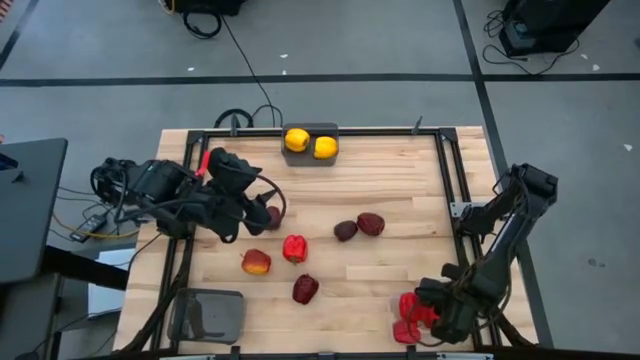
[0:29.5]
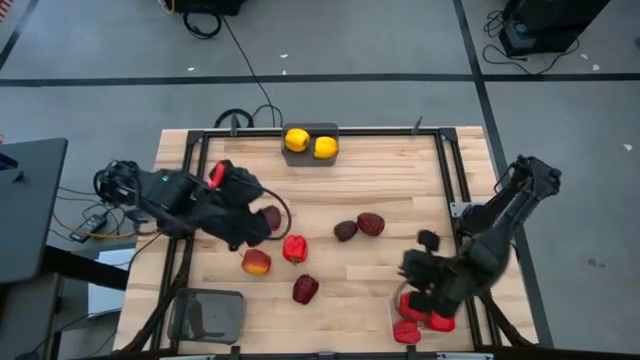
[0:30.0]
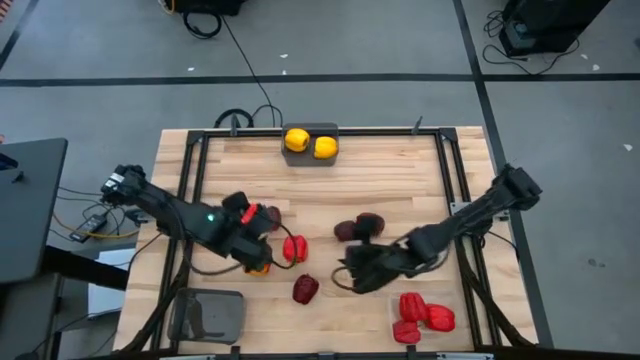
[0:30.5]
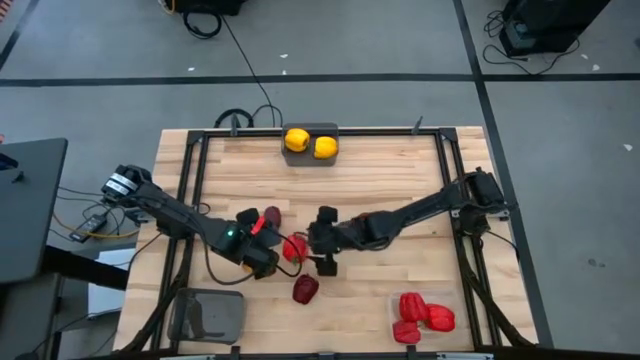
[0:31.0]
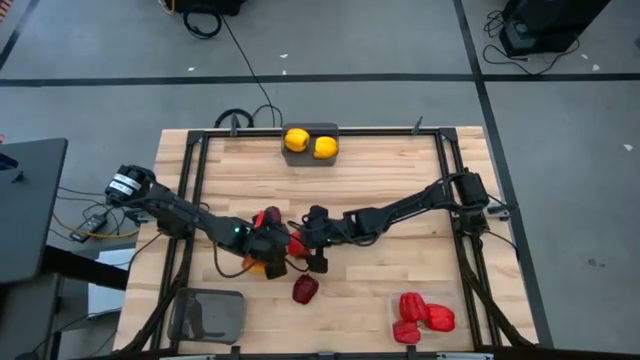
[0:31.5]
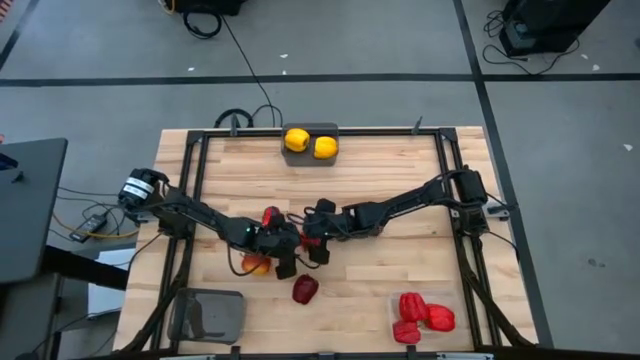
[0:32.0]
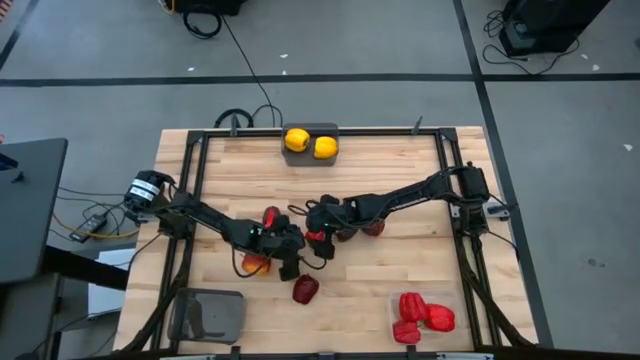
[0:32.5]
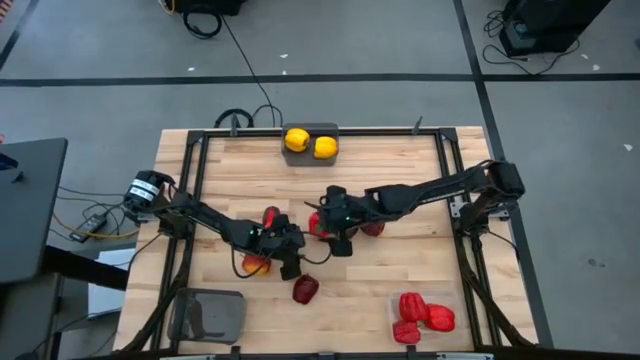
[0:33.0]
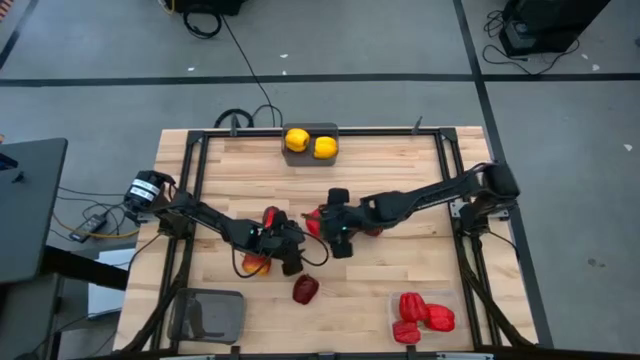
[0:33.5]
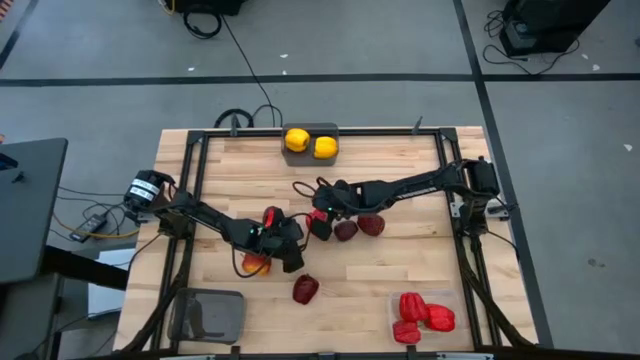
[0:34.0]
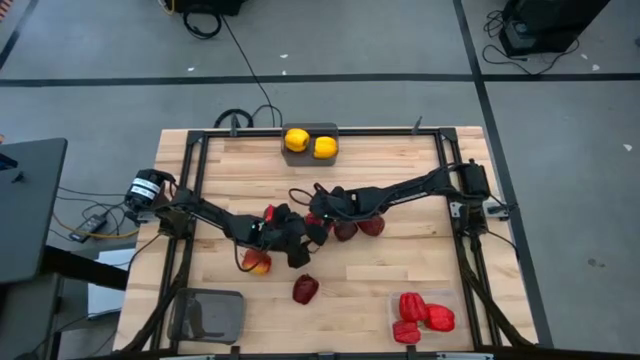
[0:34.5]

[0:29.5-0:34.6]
Task: Sort produce into baskets
Put the red bell pepper into the transparent bin

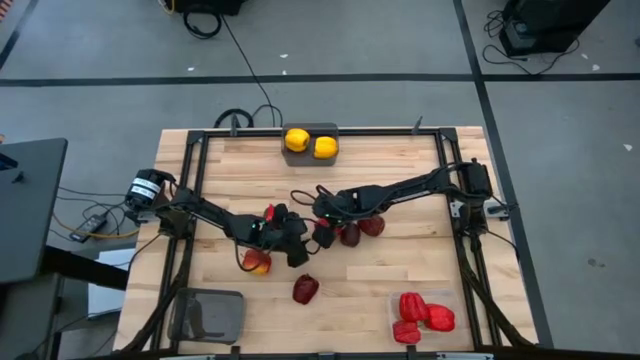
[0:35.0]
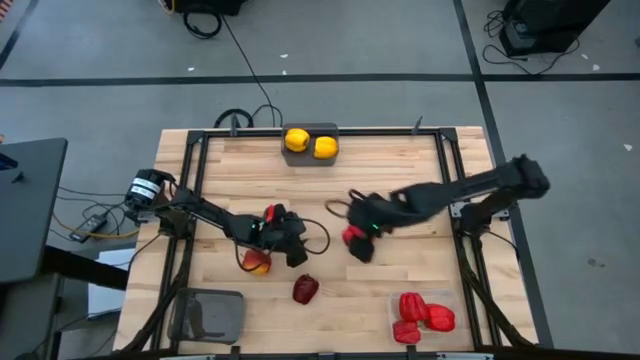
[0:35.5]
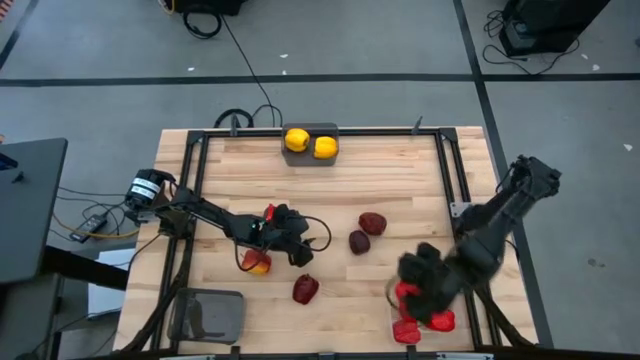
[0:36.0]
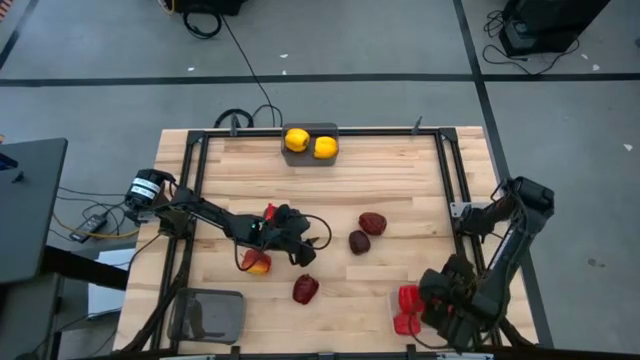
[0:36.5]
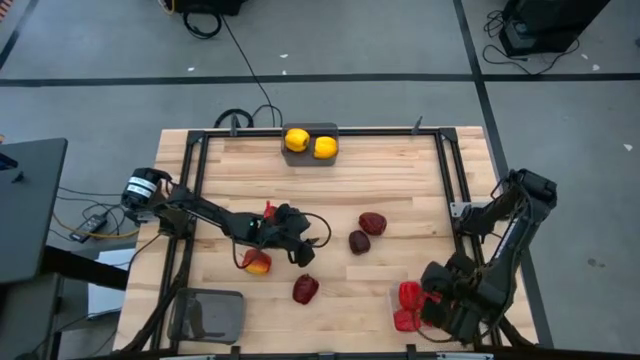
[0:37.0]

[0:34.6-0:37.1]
Put the red bell pepper into the transparent bin

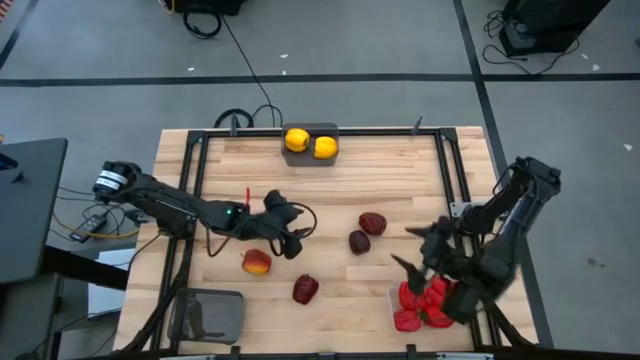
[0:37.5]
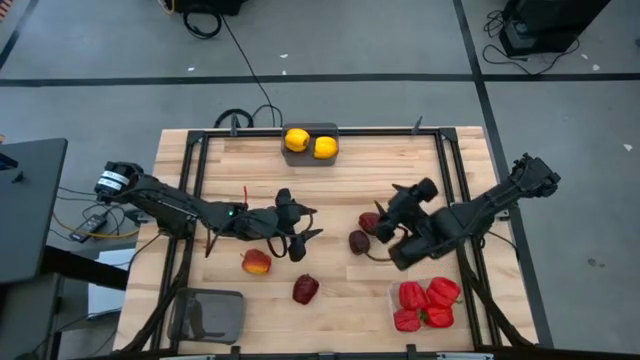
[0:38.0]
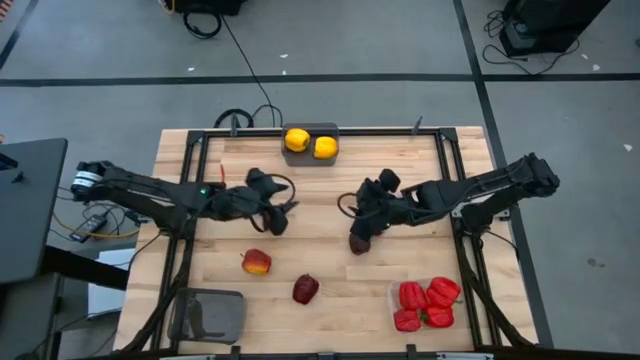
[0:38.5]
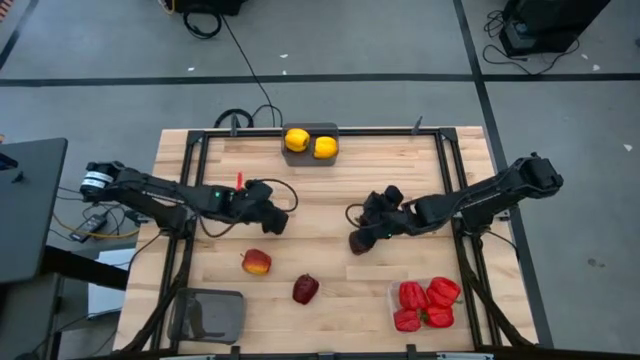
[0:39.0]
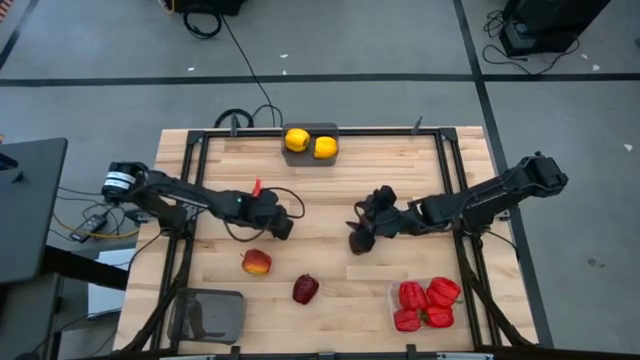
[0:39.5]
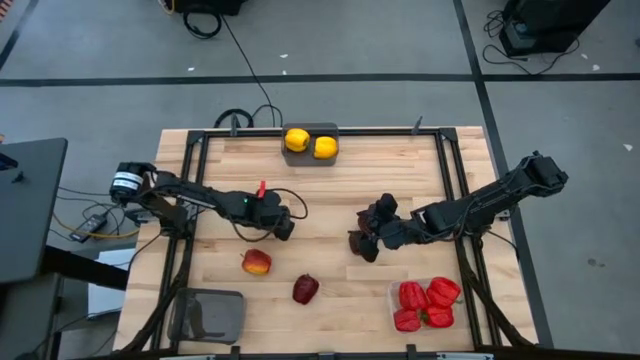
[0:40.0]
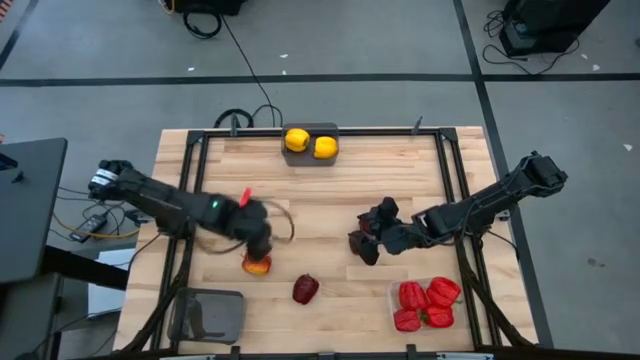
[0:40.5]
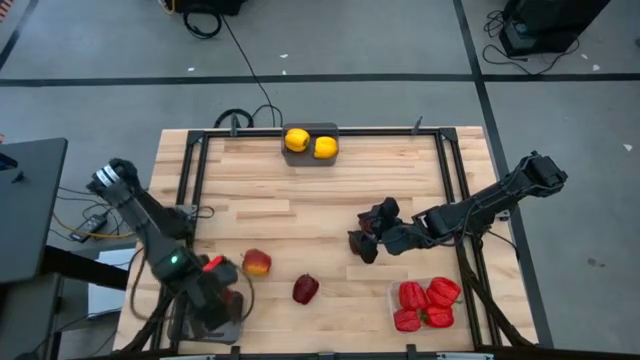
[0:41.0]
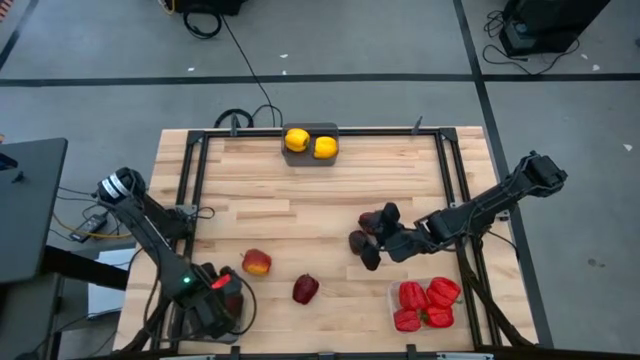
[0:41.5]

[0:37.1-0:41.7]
Put the red apple into the bottom black bin

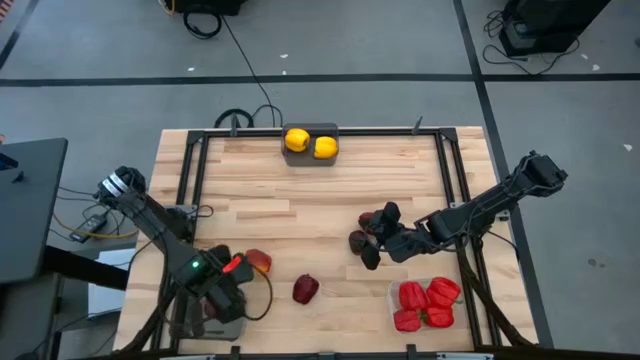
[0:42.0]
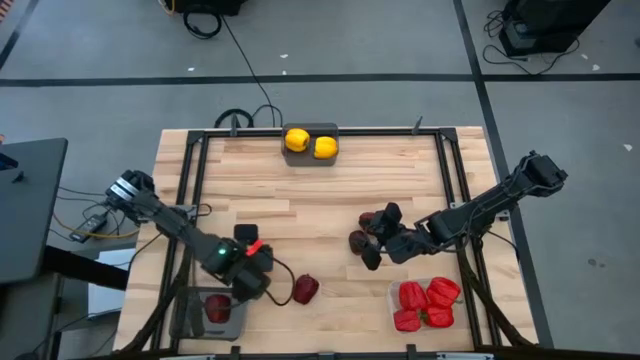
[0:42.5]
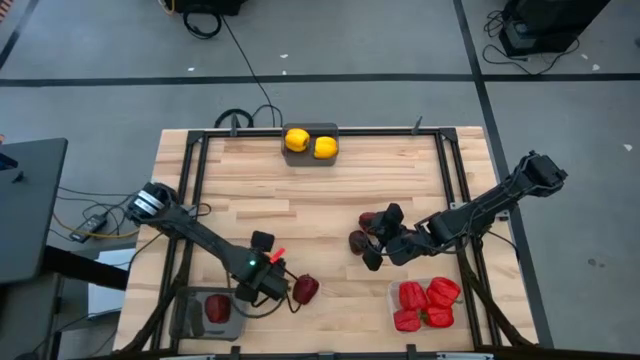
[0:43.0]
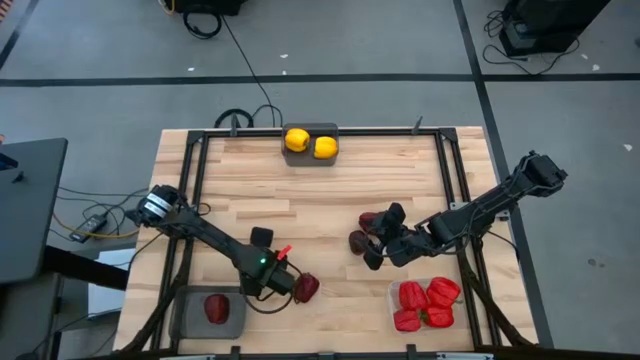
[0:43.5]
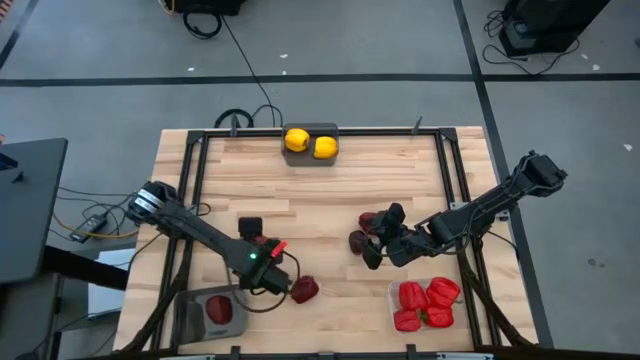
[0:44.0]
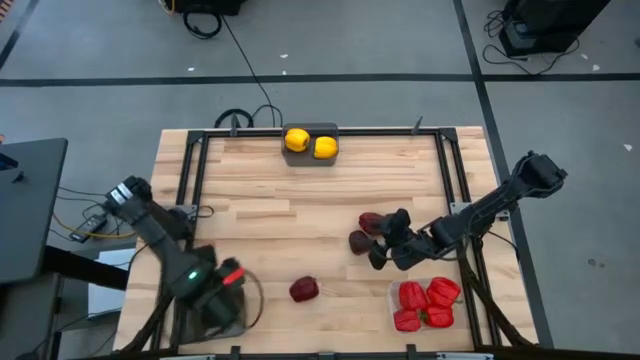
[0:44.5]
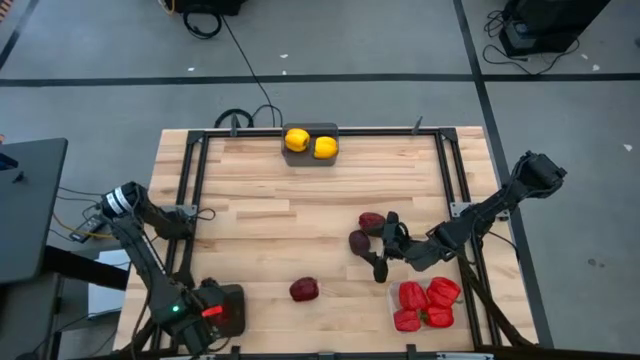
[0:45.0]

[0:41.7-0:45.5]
Put the red apple into the bottom black bin

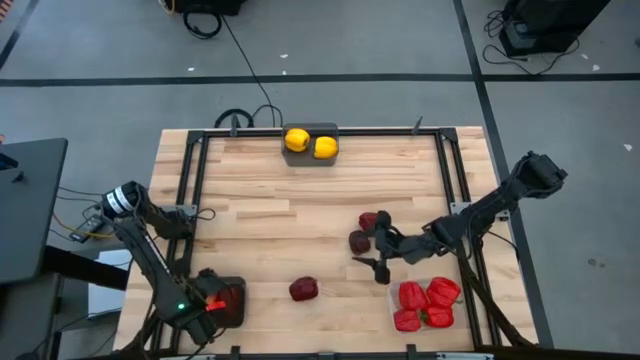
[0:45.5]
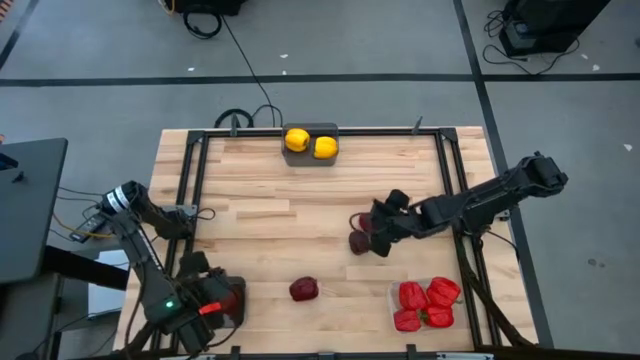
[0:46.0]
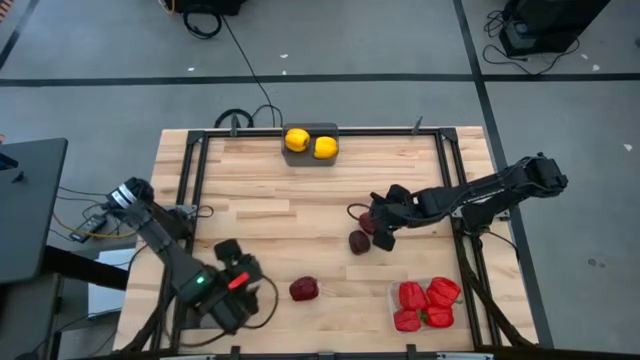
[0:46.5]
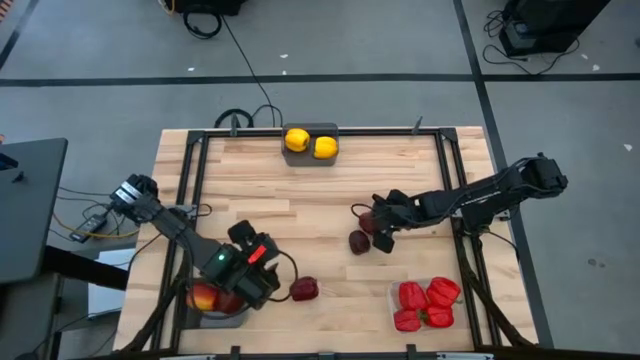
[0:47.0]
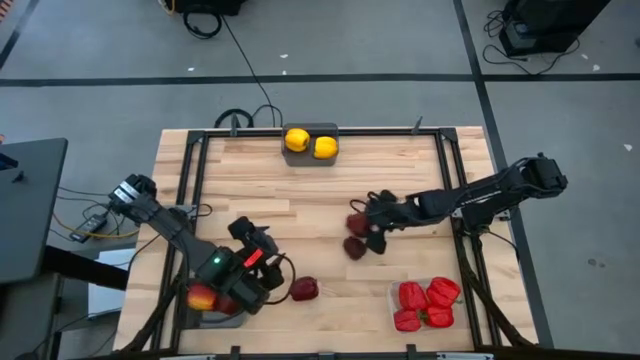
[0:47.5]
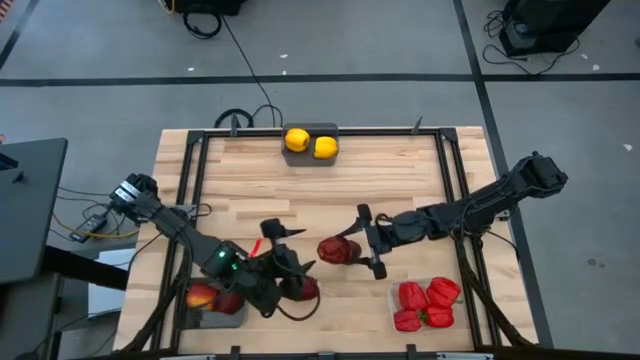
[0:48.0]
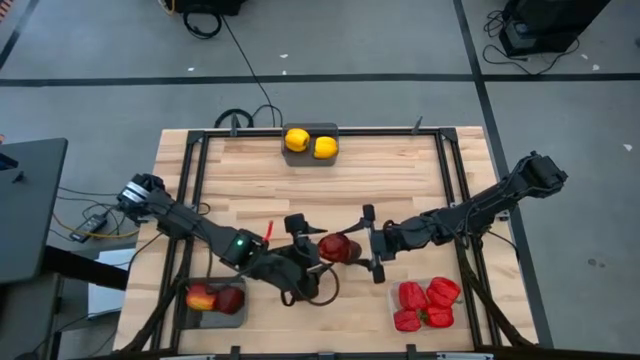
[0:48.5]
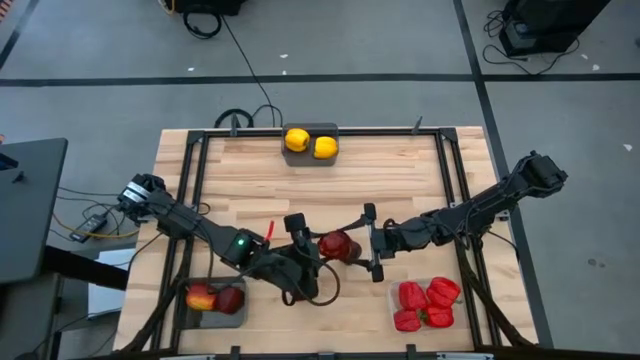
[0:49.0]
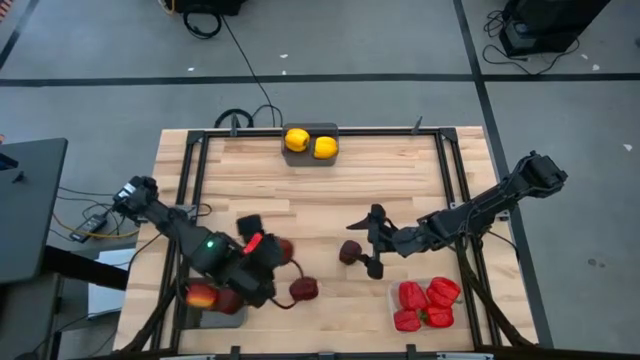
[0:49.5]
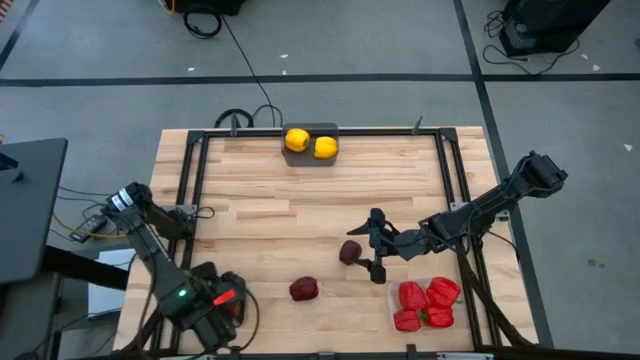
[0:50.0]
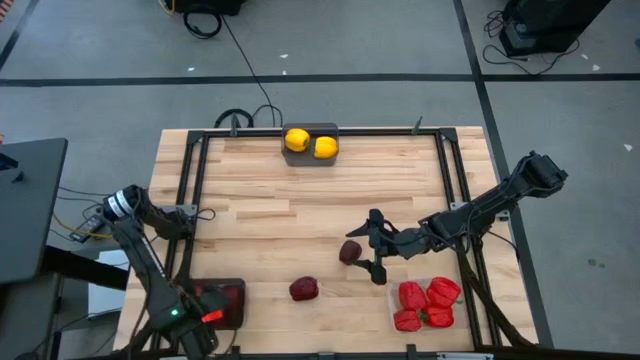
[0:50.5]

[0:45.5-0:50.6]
Put the red apple into the bottom black bin
